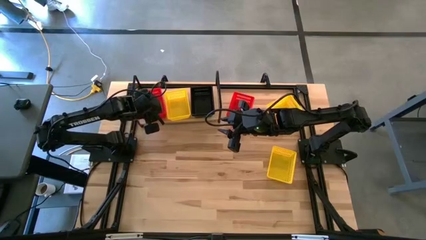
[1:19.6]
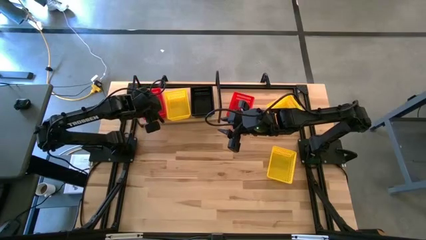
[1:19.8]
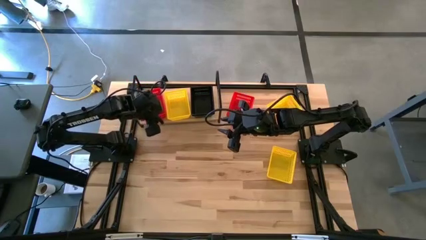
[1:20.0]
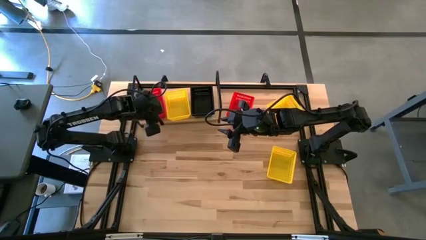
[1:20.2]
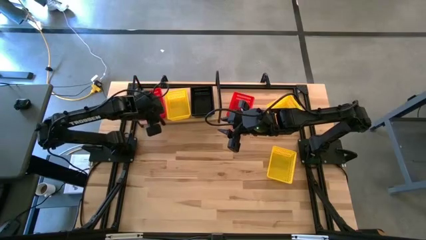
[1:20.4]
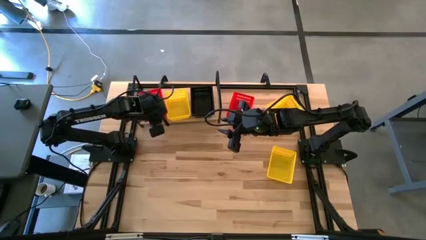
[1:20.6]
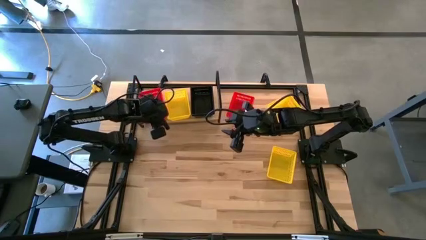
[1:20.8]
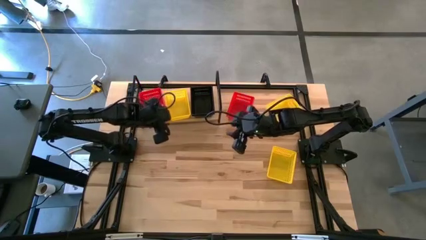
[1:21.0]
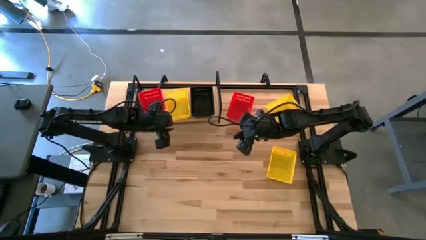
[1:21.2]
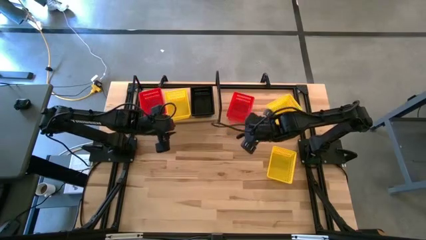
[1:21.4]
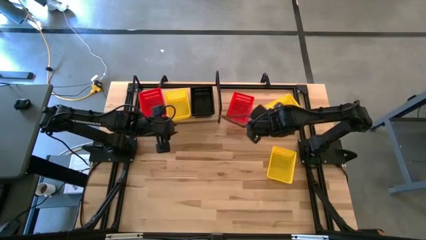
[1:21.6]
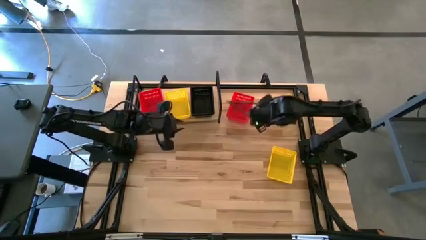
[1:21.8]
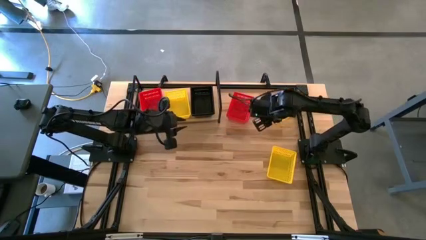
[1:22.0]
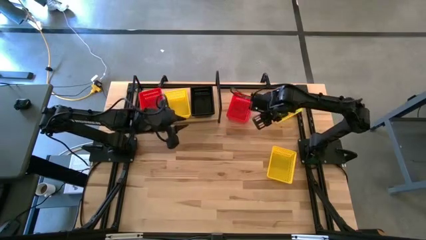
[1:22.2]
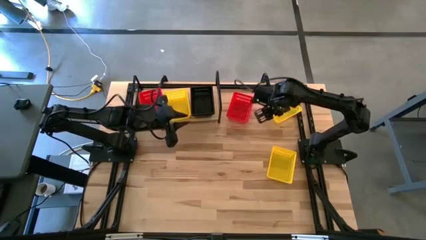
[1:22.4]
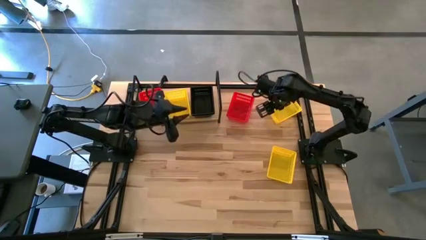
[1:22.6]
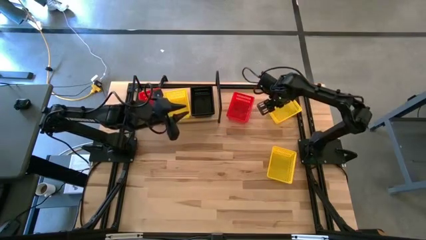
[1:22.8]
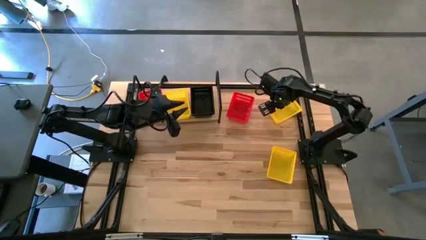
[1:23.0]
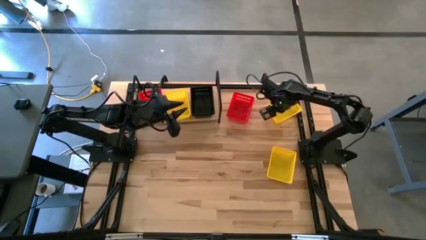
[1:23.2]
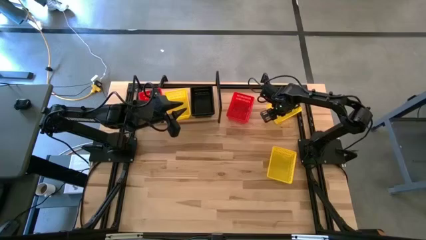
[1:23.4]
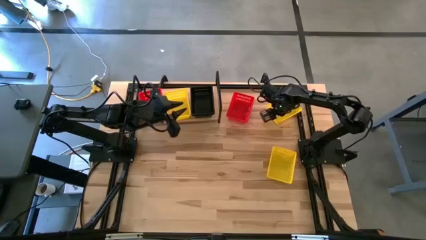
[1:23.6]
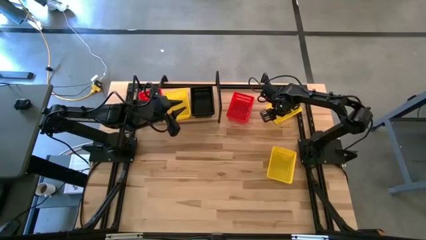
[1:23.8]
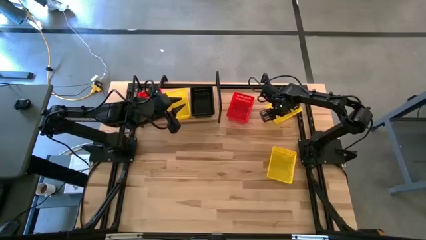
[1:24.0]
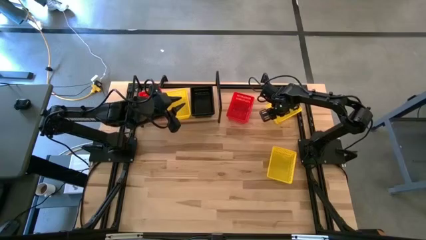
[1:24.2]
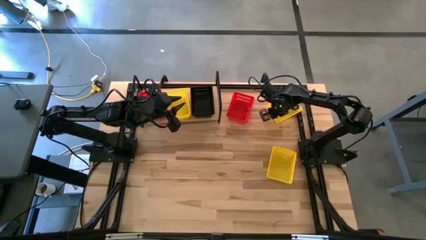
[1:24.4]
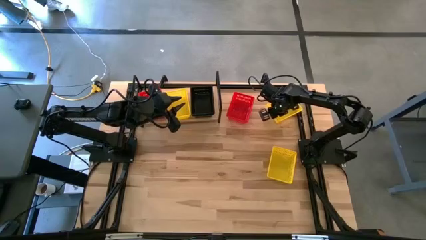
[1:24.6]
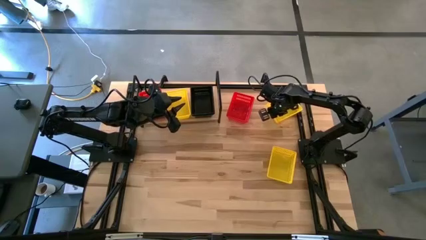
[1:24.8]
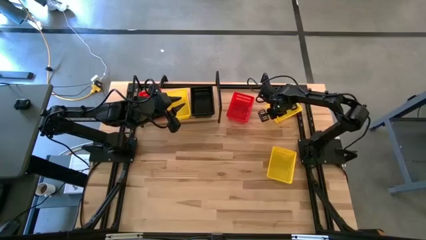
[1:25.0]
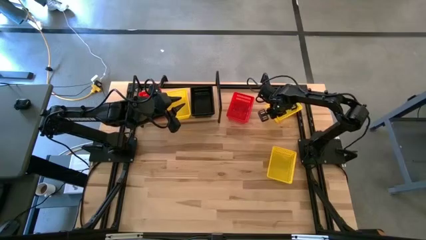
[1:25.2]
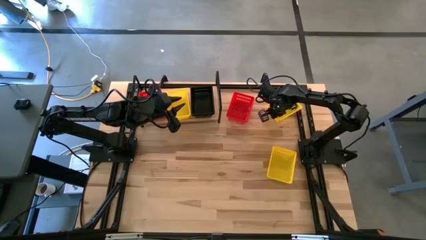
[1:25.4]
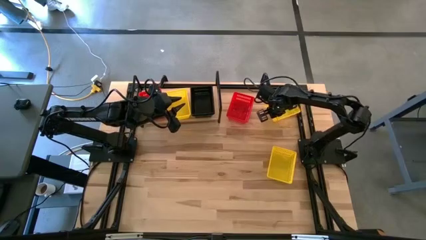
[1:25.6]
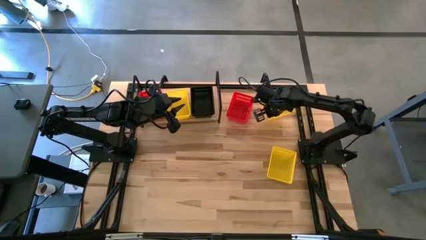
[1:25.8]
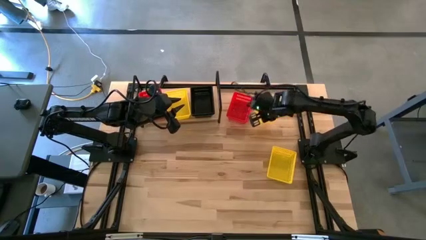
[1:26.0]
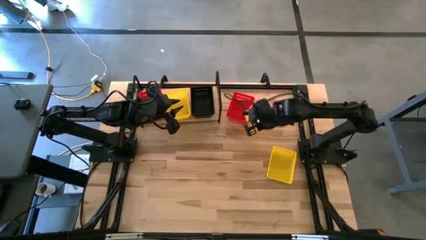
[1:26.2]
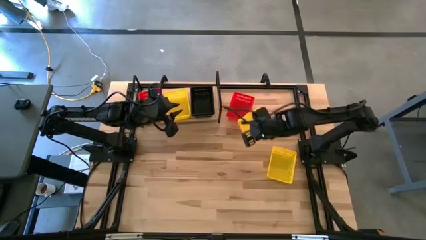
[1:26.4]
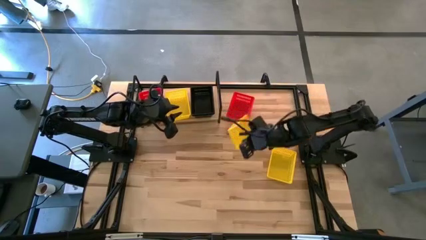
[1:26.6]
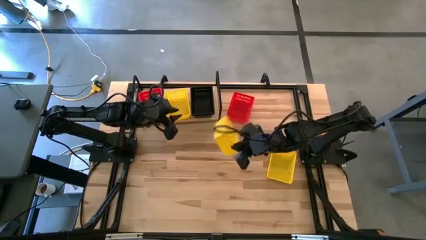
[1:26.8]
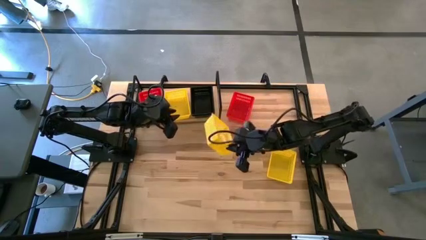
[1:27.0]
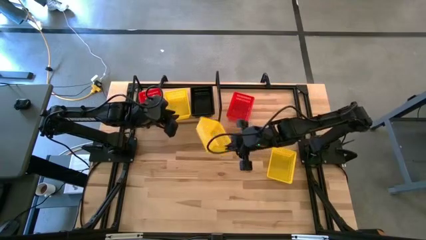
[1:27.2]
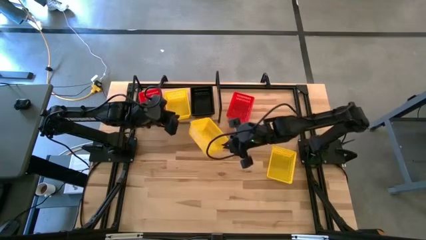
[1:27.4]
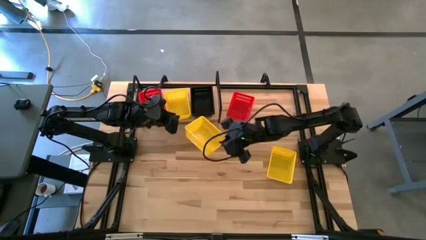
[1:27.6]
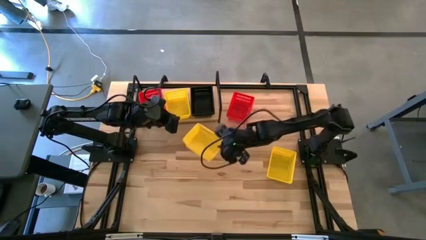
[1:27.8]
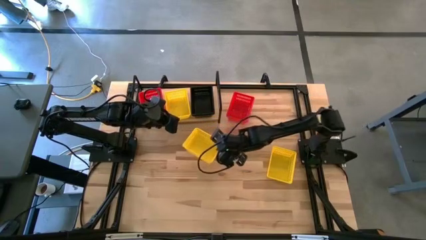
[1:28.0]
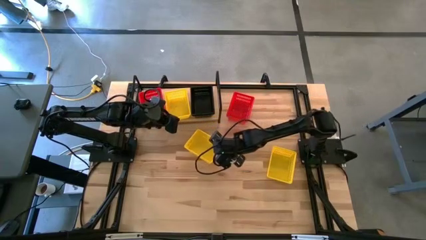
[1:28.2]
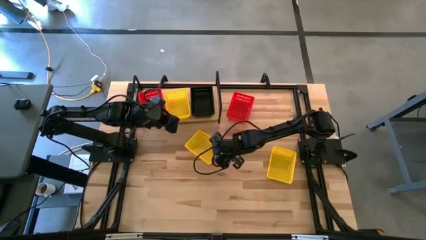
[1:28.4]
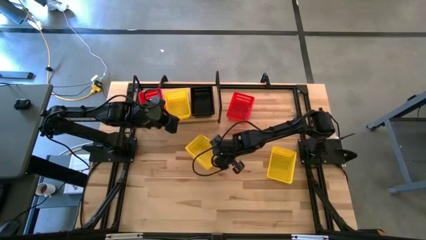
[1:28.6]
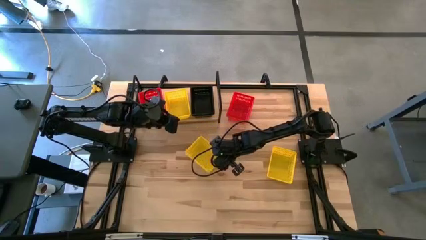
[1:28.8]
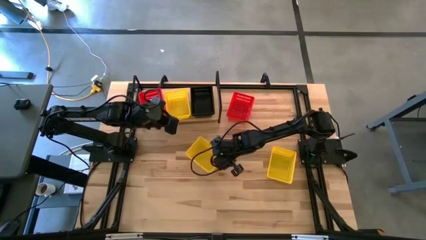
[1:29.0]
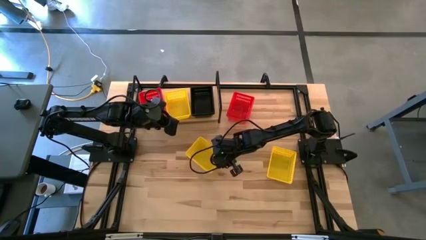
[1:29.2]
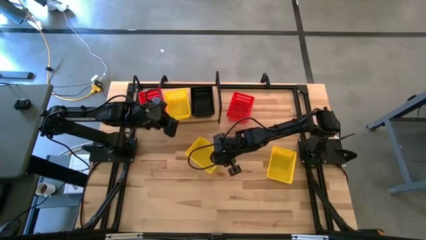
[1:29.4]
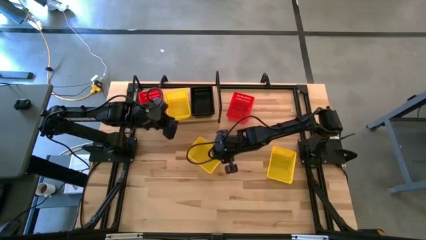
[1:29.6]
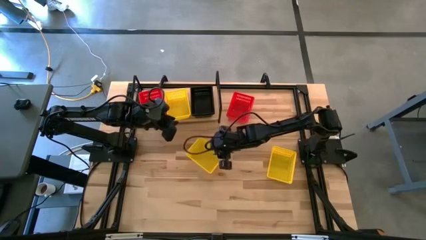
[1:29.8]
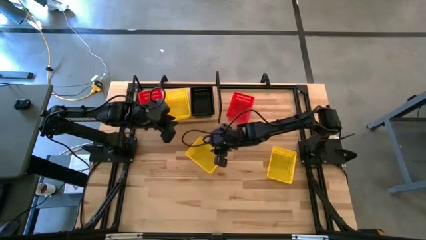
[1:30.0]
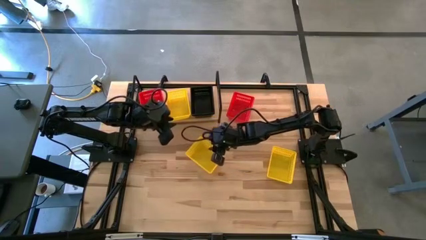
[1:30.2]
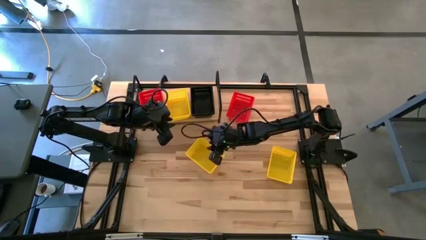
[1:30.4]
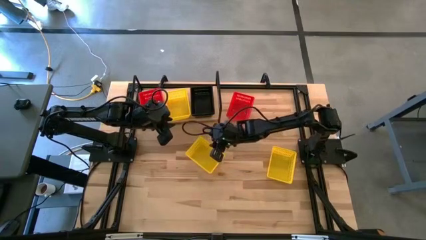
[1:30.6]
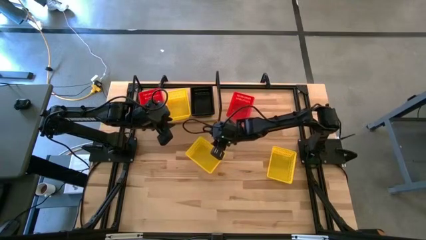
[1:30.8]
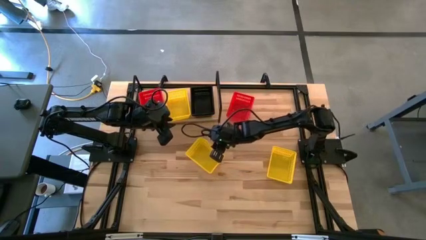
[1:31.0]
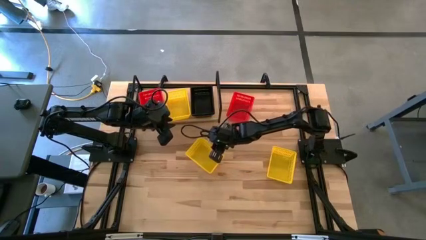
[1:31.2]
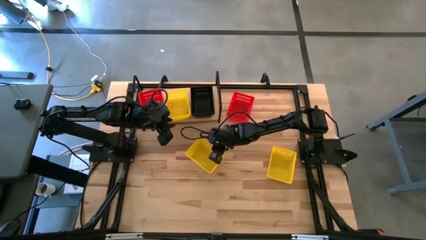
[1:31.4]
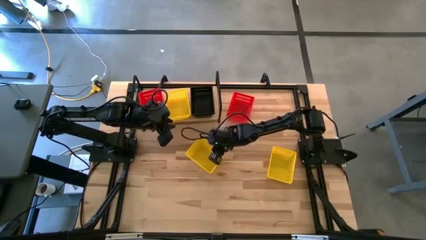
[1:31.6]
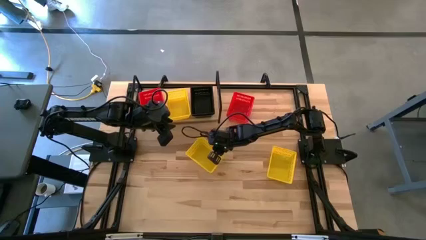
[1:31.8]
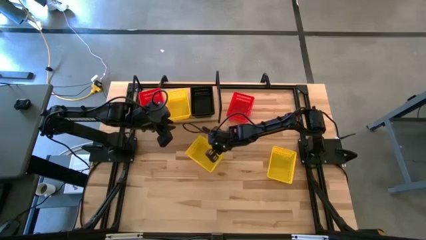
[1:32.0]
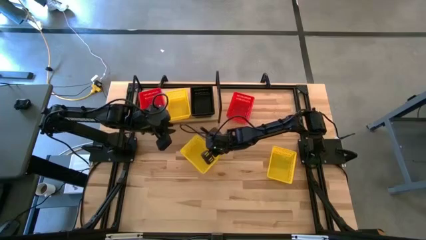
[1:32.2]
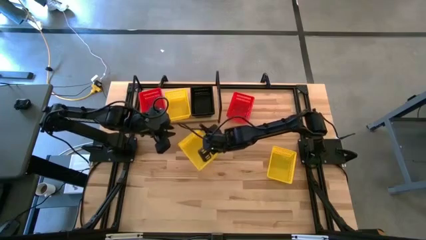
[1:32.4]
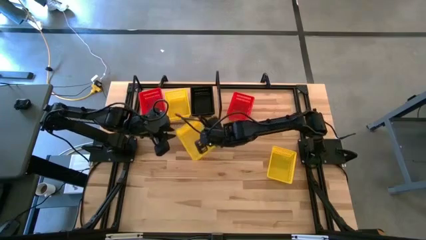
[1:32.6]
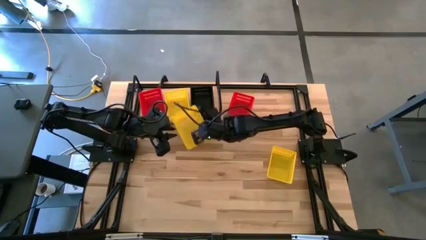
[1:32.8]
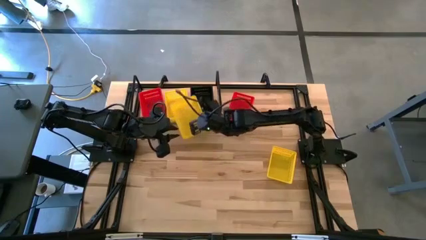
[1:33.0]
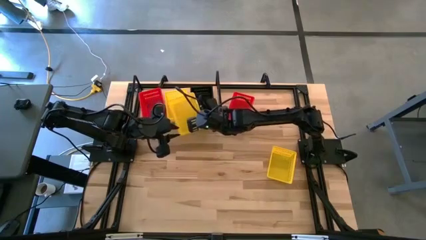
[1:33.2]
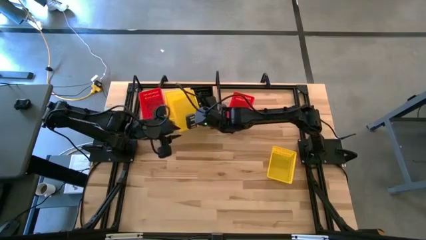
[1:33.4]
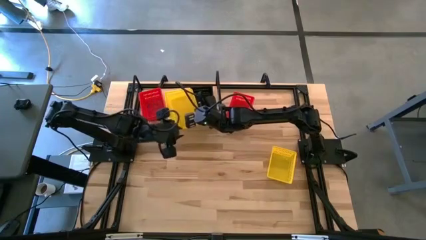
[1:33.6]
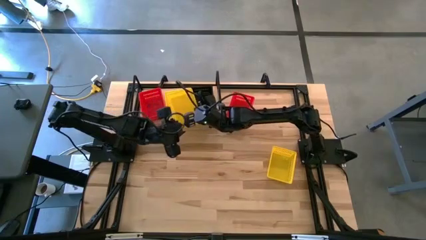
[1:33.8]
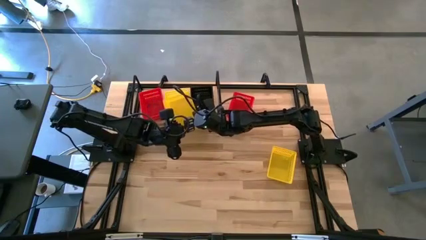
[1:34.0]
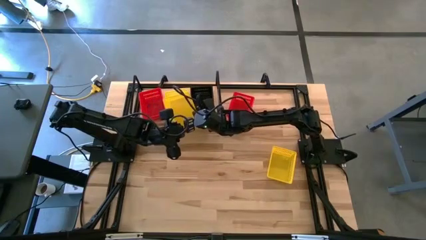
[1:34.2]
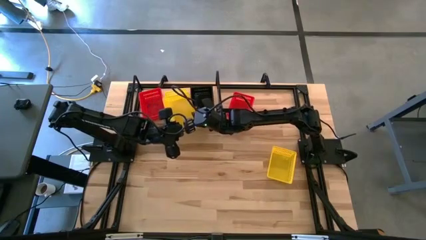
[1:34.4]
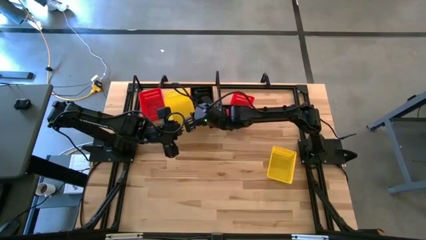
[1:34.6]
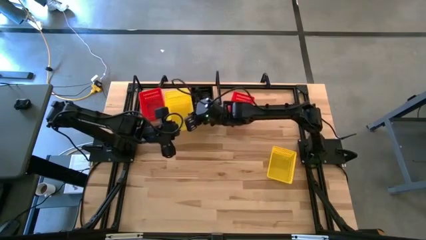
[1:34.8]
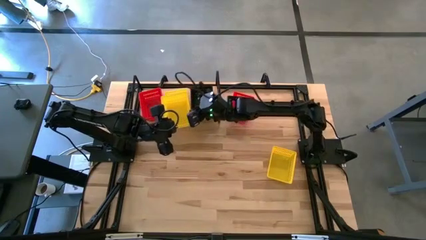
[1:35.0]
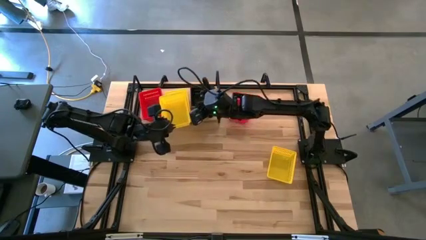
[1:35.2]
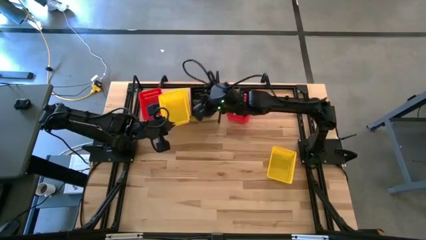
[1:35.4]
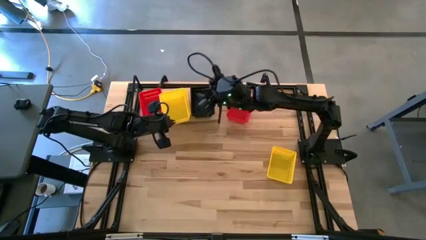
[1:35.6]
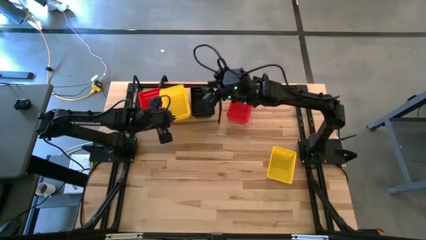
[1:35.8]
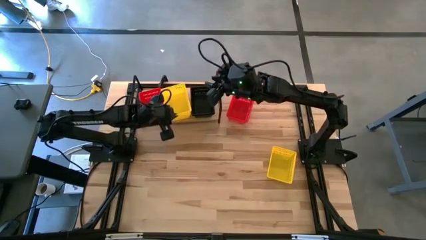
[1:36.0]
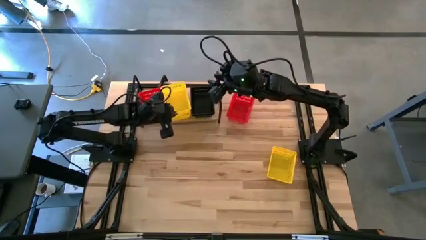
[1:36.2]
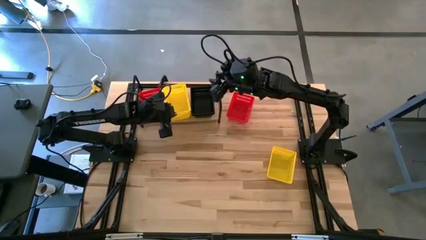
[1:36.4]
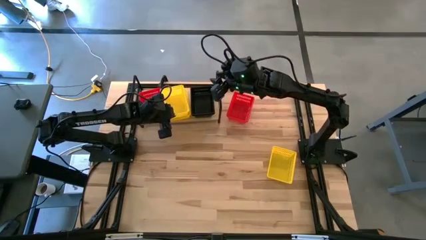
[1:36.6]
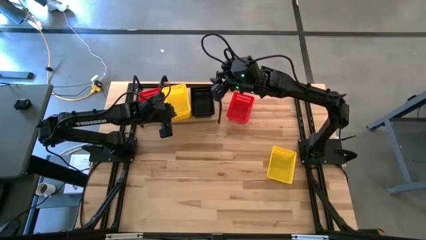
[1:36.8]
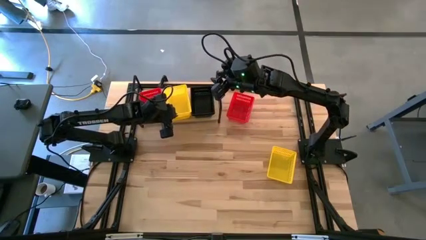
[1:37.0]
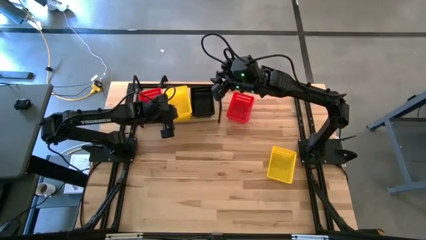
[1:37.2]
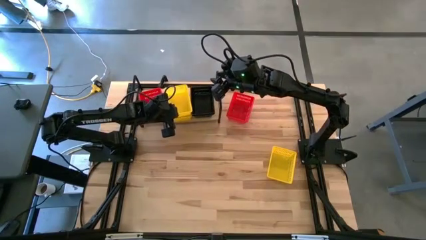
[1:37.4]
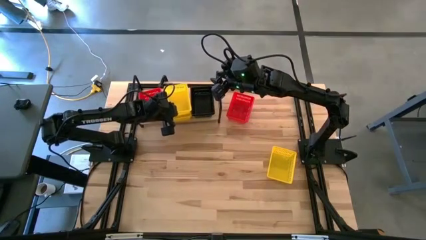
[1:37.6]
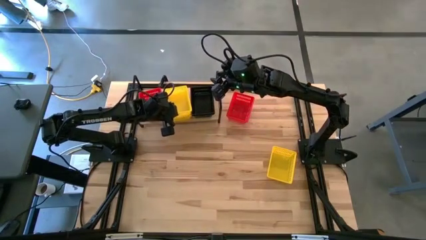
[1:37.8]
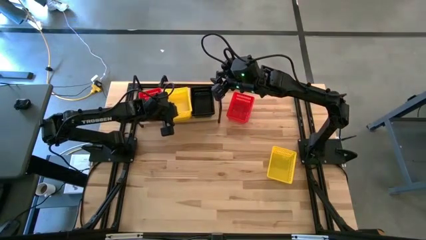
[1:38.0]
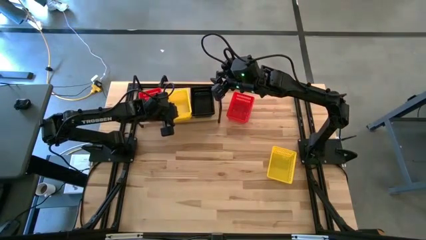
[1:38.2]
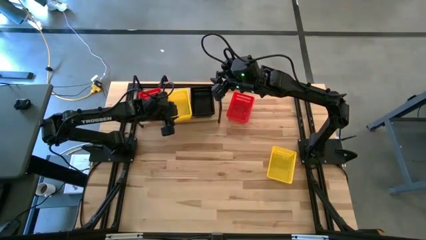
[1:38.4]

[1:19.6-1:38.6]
Task: Stack baskets on shelf by color
Stack the top yellow bin on top of the yellow bin on the shelf
